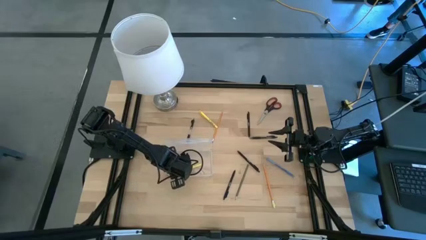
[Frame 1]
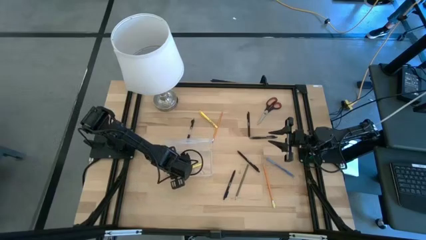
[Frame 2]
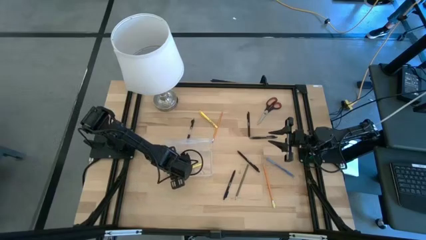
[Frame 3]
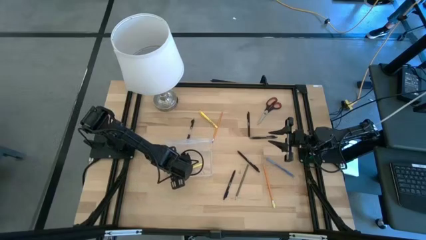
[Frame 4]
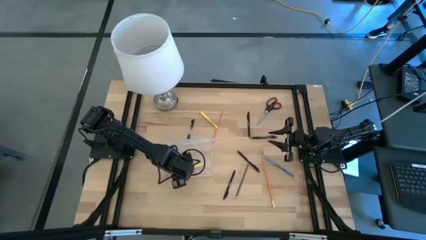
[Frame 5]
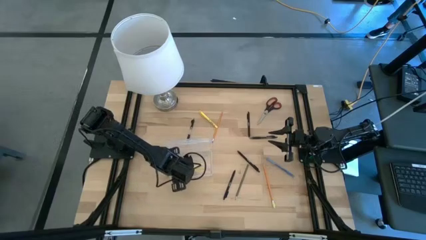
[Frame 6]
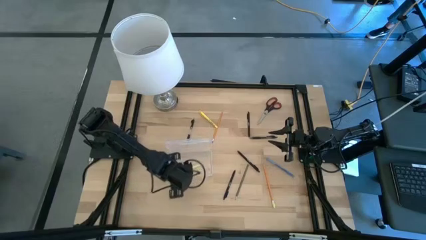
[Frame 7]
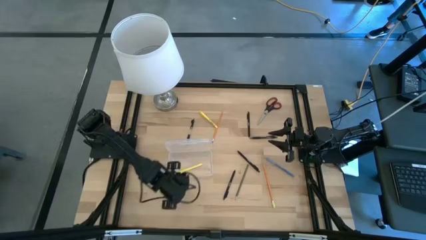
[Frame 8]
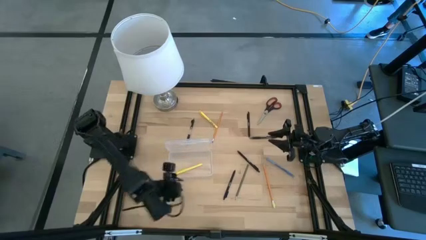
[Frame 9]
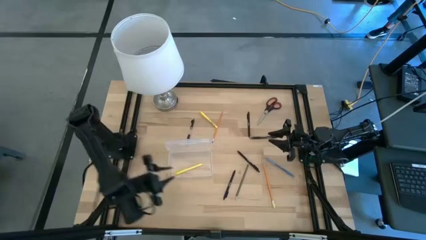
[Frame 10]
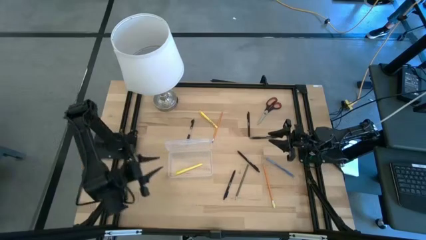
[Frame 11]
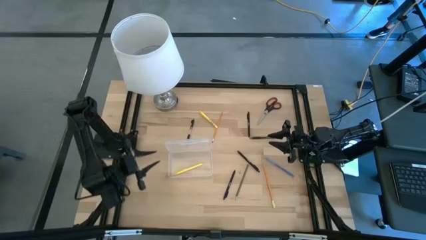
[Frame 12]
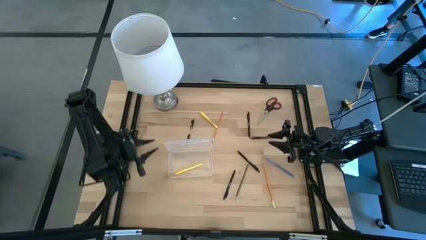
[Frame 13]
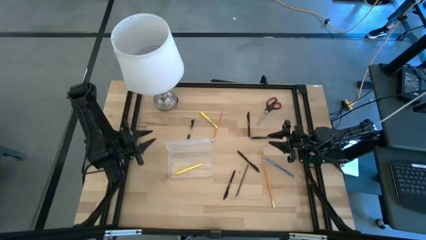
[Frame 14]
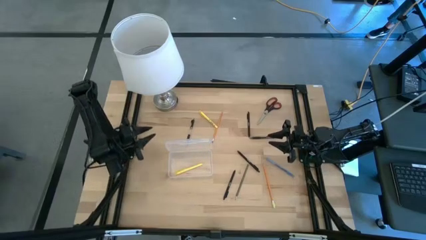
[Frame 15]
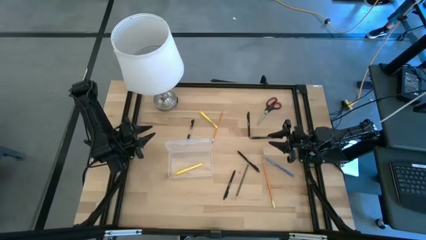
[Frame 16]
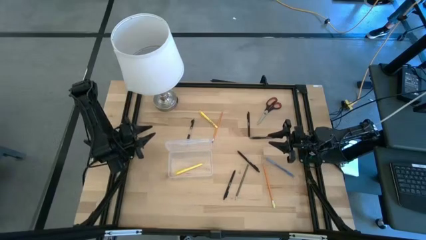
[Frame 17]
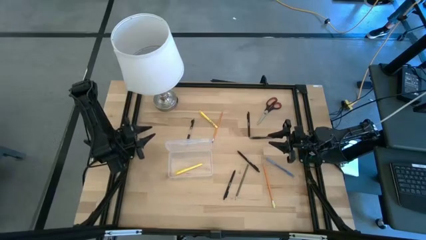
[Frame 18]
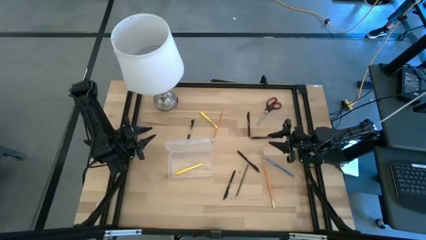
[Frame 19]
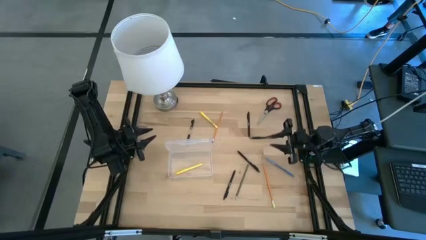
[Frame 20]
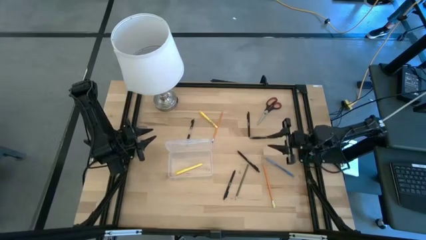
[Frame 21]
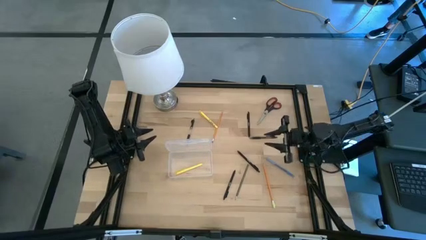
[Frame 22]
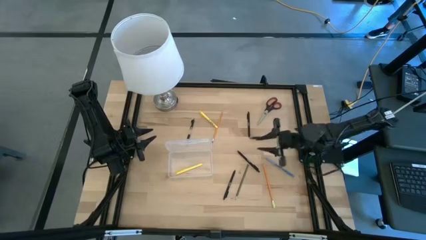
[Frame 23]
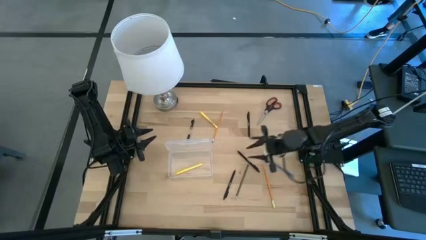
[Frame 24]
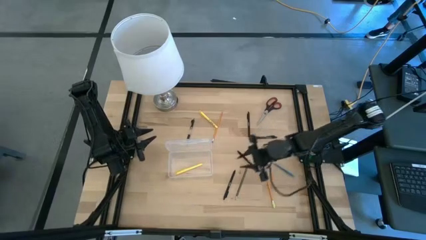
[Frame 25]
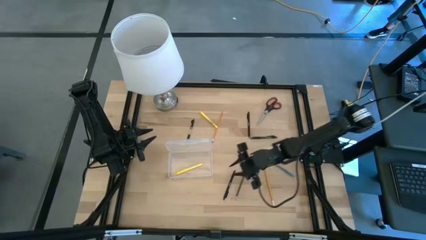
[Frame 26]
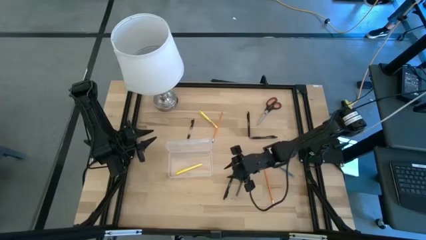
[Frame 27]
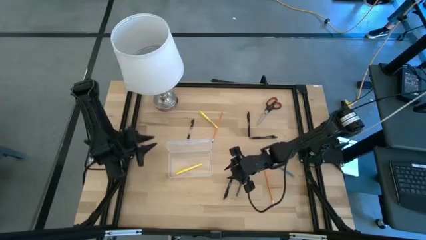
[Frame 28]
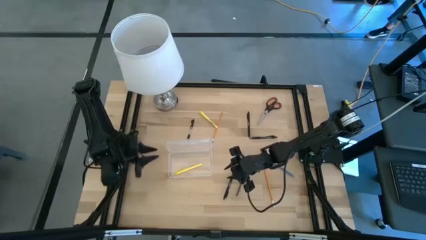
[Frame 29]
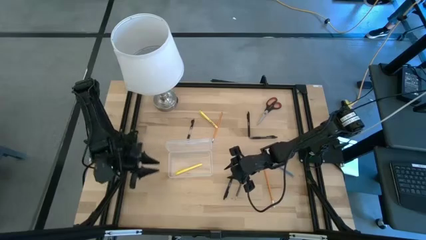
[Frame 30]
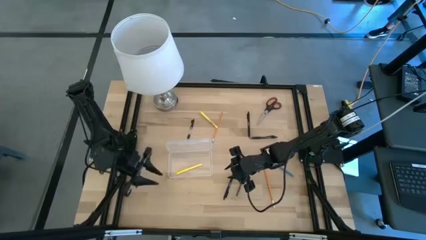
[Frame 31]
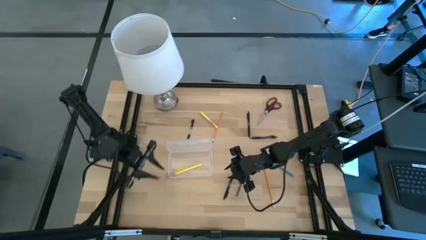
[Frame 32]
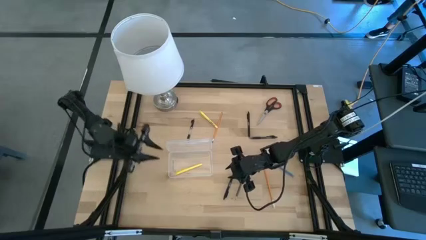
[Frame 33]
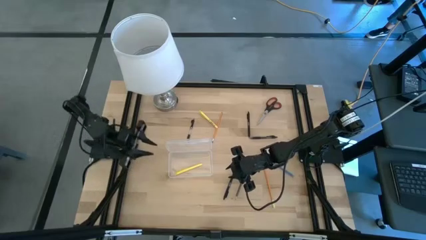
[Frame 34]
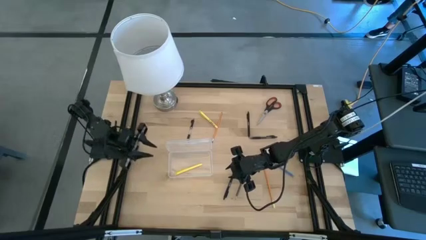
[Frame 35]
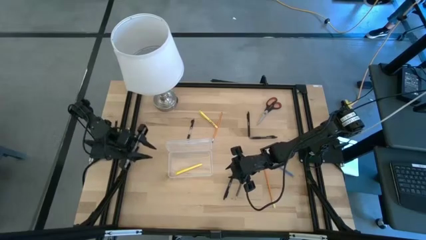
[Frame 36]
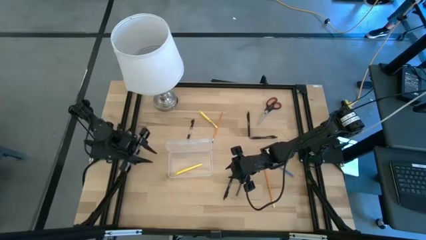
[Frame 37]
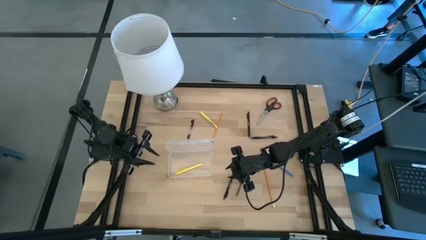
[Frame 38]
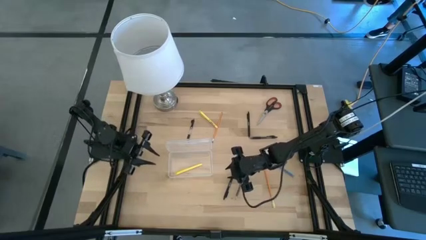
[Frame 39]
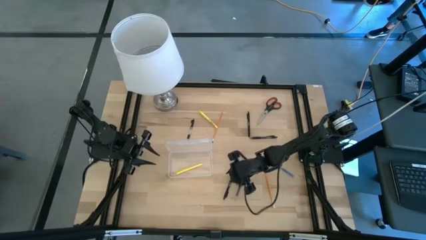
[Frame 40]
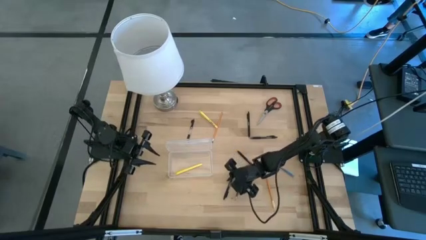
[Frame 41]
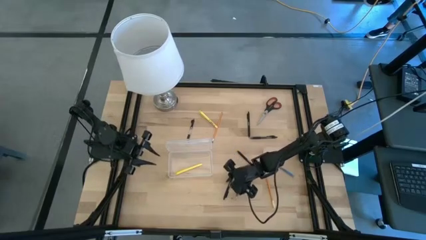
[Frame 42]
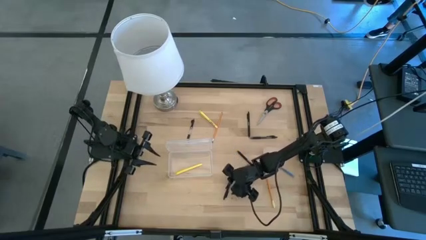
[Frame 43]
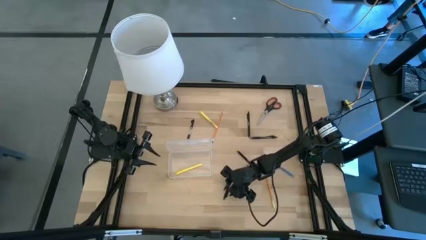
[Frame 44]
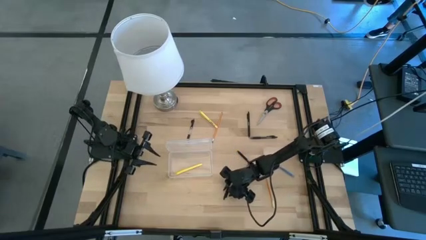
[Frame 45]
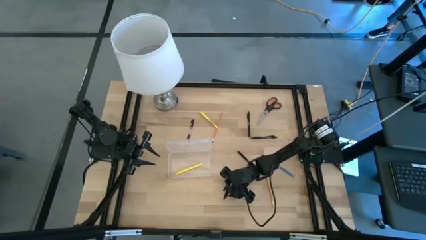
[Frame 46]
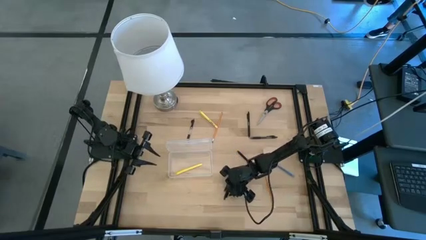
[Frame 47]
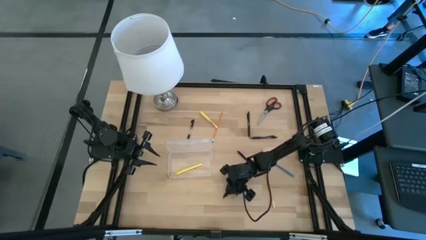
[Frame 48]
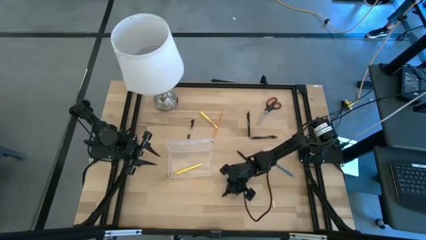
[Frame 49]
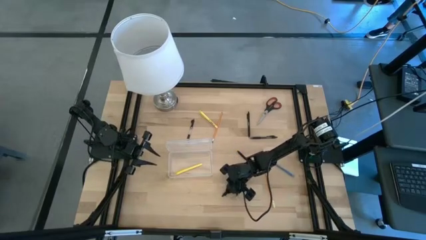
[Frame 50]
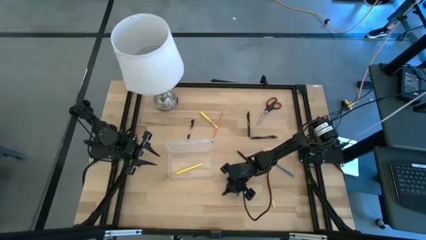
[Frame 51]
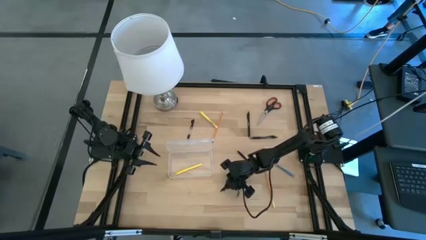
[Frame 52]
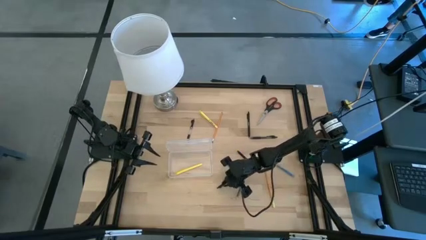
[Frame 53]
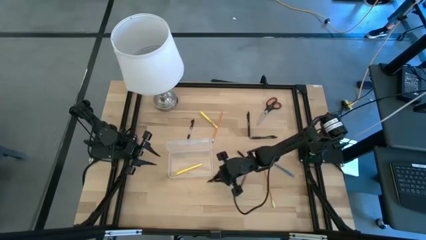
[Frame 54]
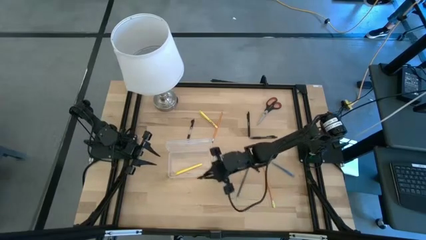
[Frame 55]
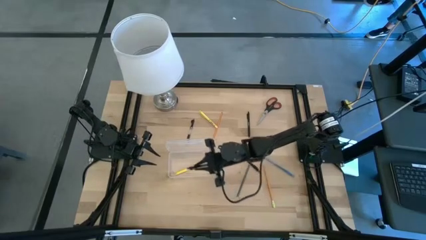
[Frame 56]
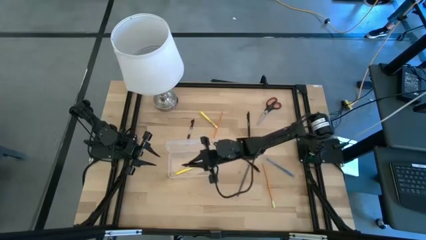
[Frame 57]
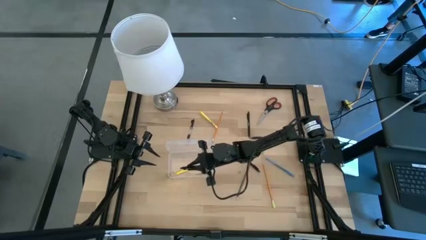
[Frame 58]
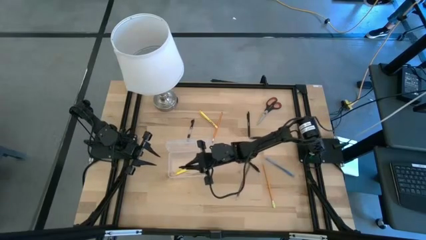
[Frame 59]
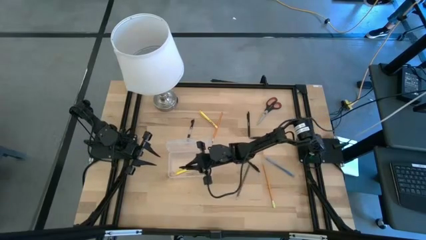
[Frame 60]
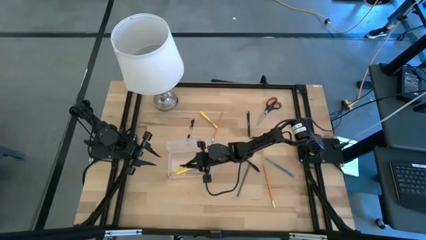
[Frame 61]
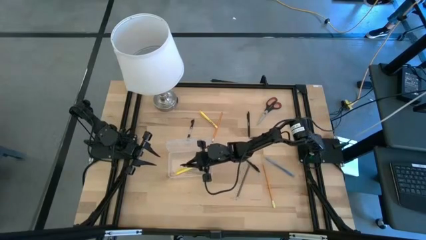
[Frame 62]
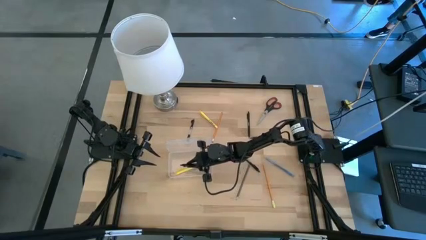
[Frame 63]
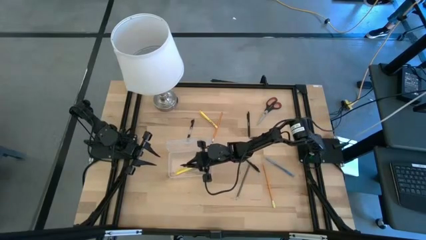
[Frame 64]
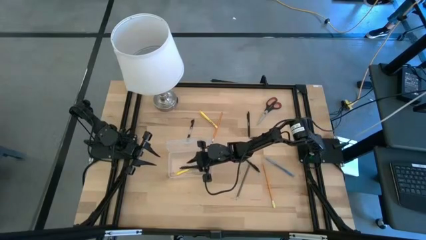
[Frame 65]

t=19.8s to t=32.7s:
Task: Pick & place school supplies into a supply box
Put the bottom black pen into the transparent supply box

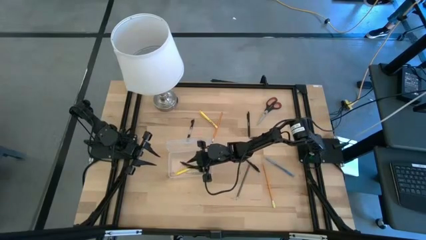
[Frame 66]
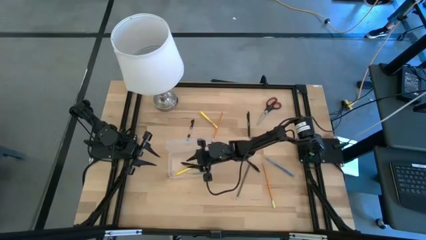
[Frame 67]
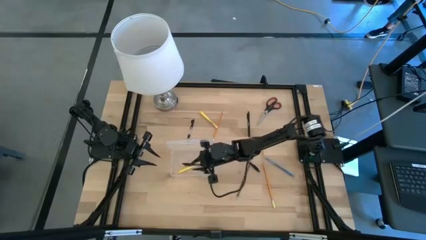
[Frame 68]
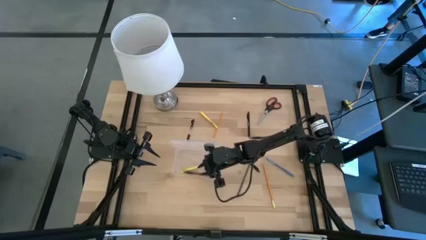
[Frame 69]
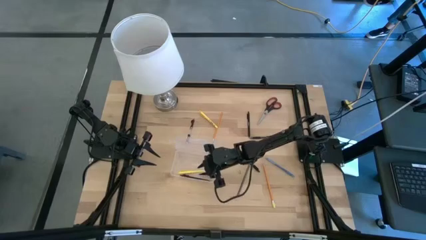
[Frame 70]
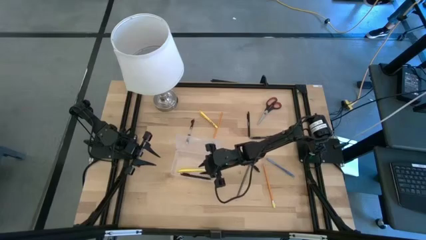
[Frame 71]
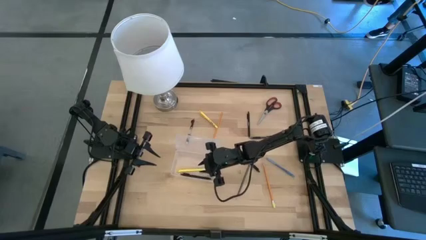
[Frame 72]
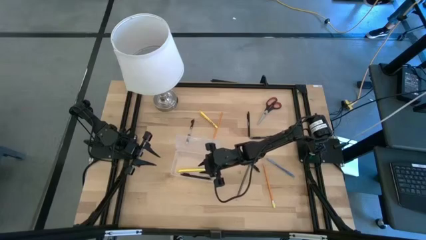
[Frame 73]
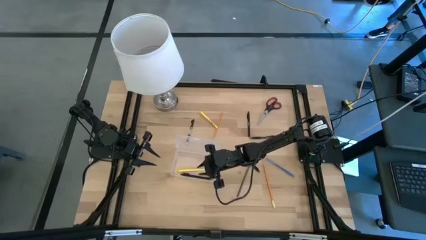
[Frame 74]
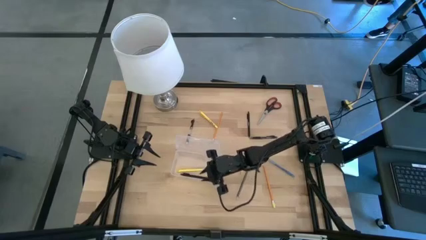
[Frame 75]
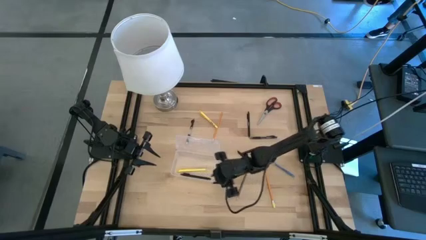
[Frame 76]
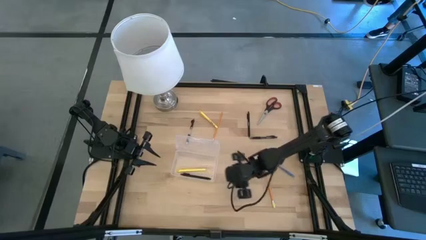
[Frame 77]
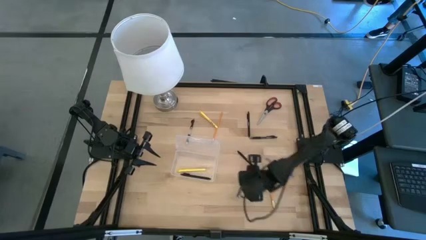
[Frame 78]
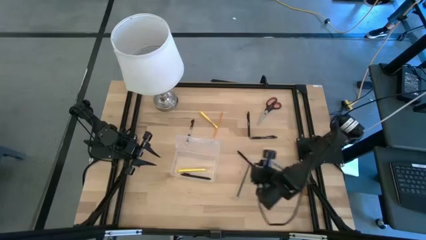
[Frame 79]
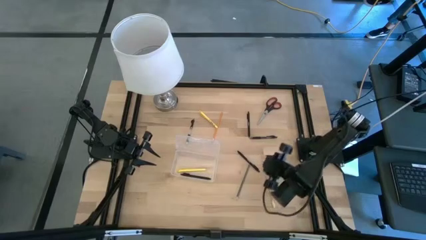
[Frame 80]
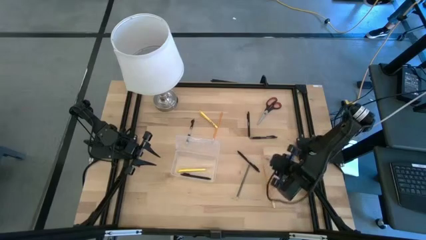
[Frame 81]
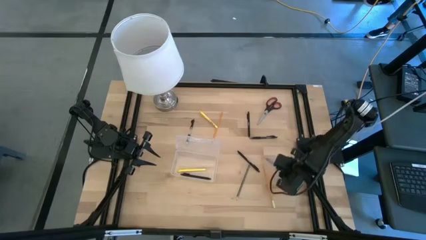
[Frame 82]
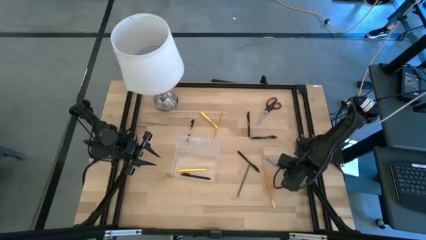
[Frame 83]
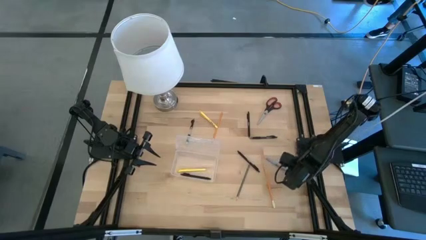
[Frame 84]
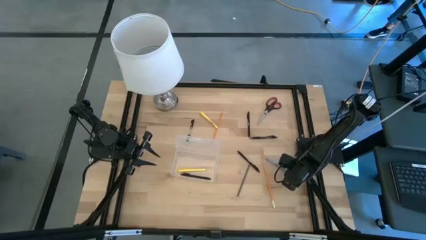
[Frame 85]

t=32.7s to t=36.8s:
Put the blue pen into the transparent supply box
